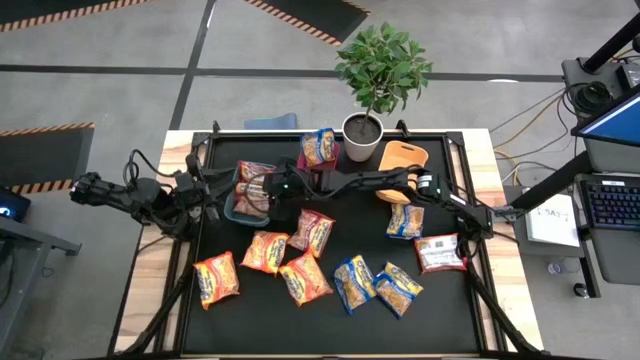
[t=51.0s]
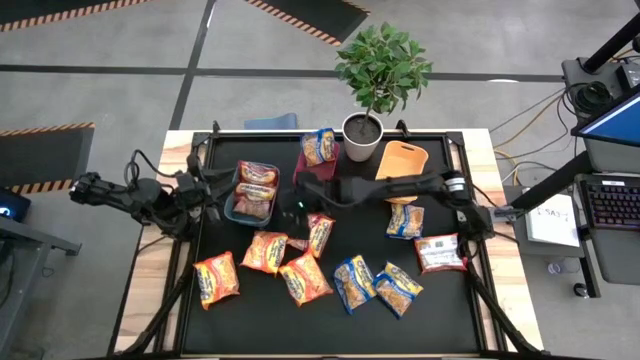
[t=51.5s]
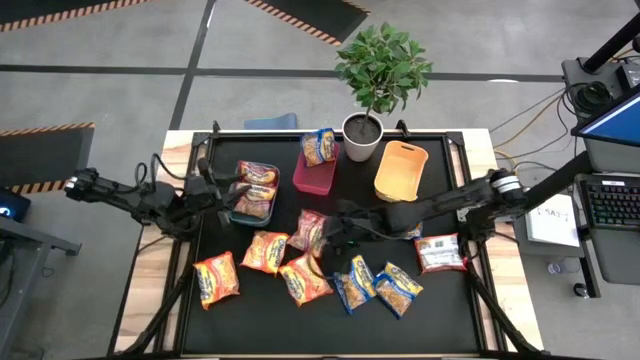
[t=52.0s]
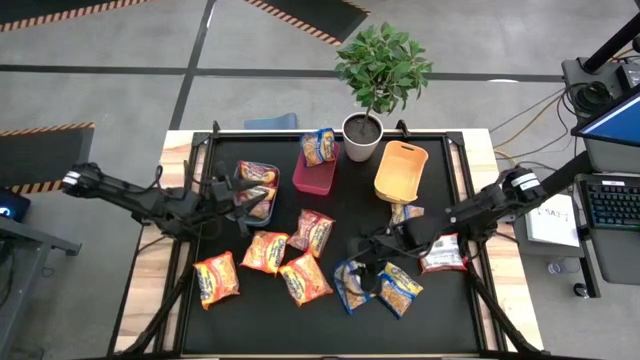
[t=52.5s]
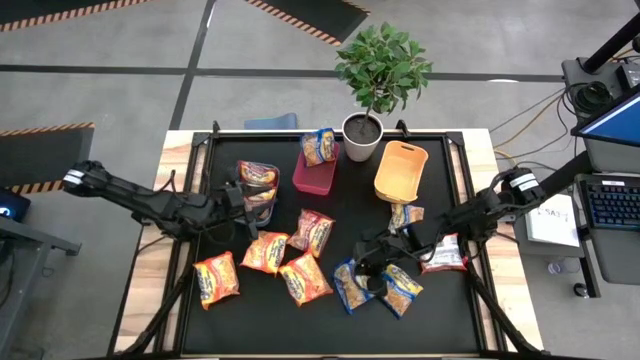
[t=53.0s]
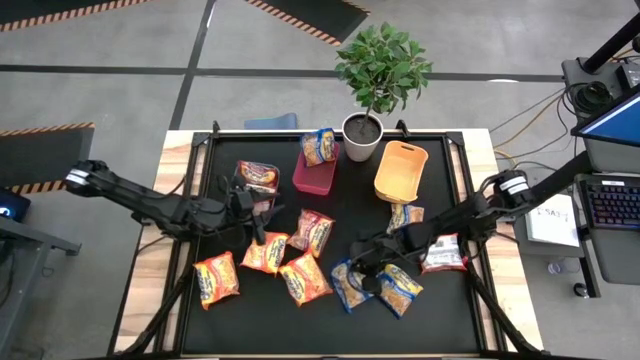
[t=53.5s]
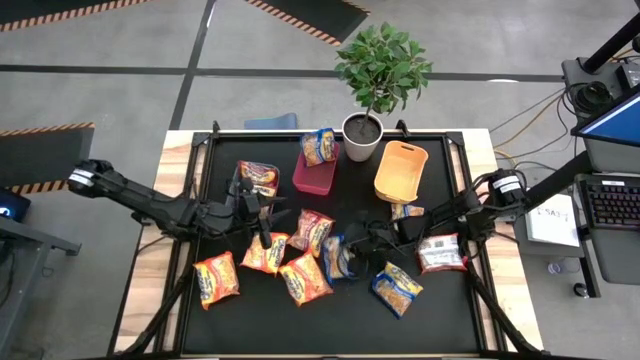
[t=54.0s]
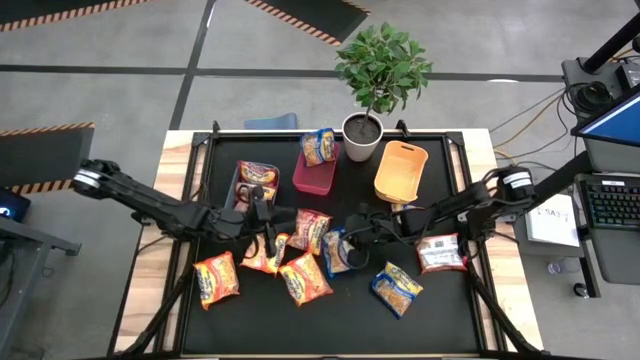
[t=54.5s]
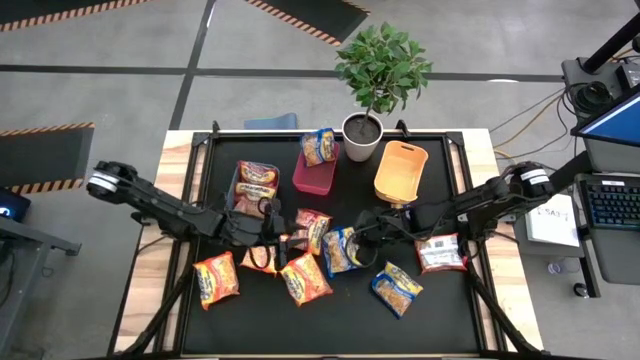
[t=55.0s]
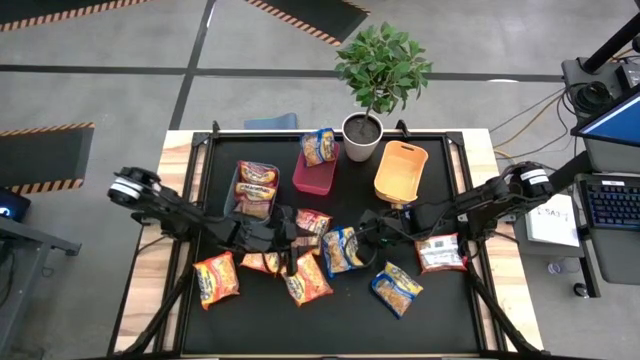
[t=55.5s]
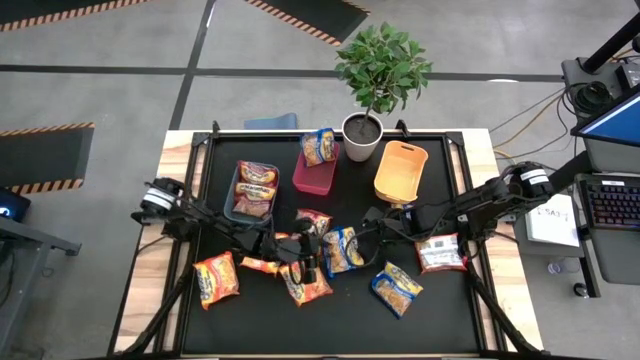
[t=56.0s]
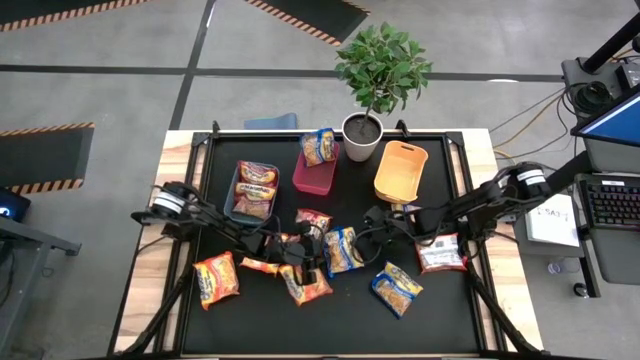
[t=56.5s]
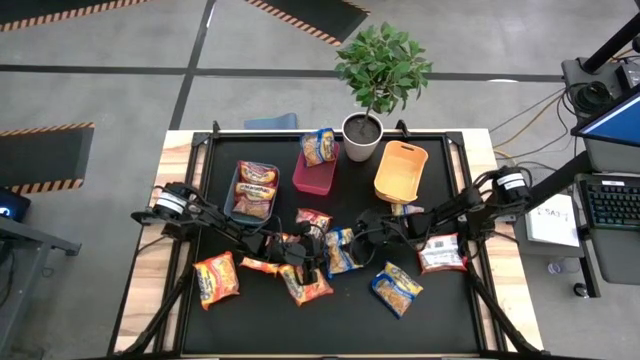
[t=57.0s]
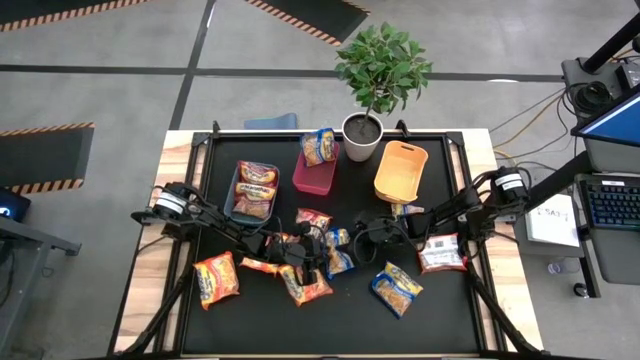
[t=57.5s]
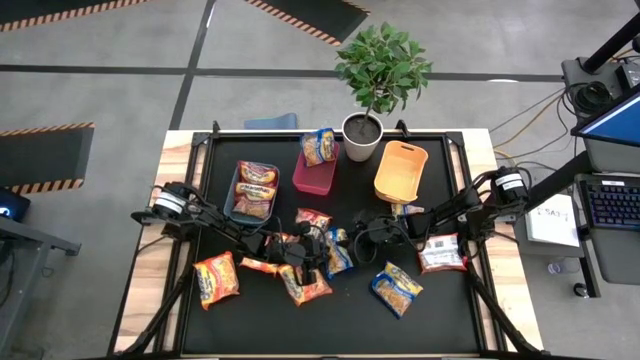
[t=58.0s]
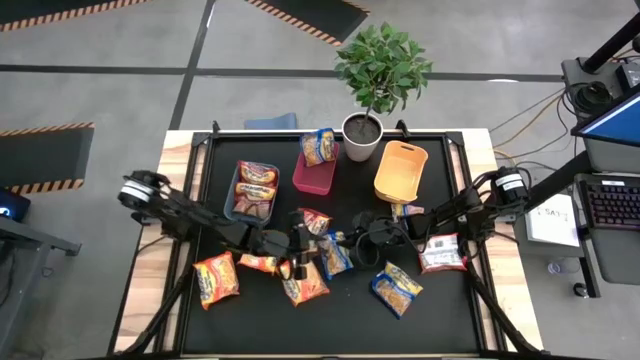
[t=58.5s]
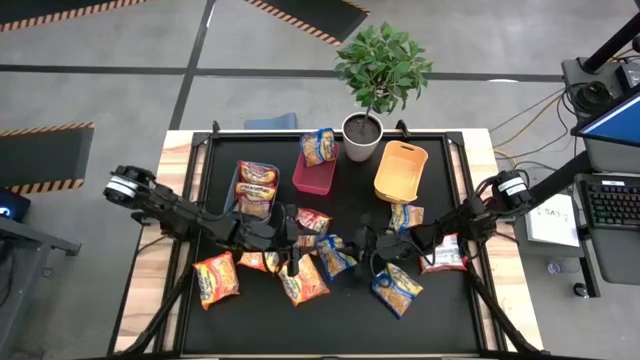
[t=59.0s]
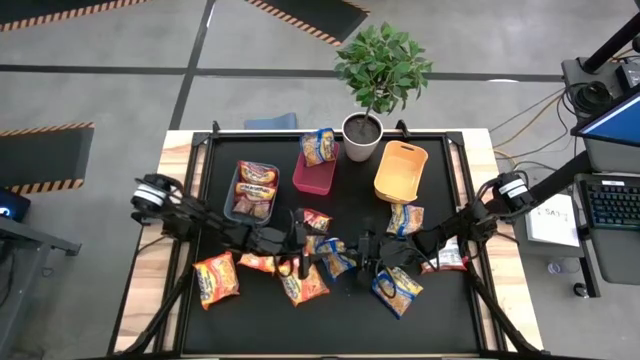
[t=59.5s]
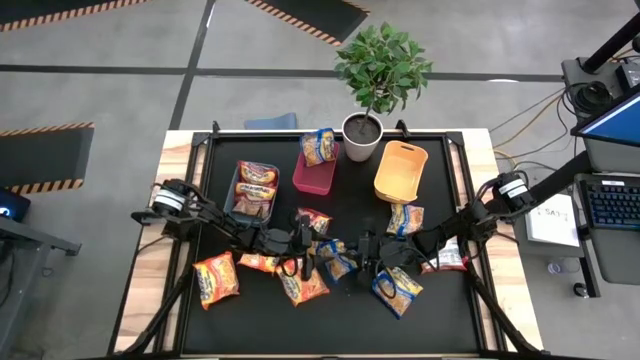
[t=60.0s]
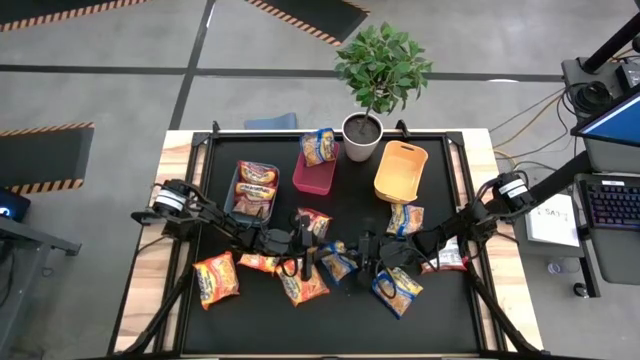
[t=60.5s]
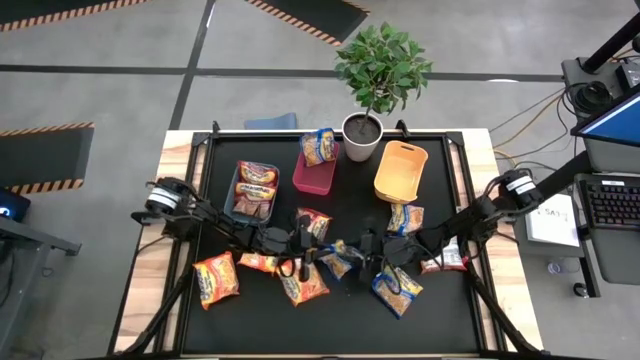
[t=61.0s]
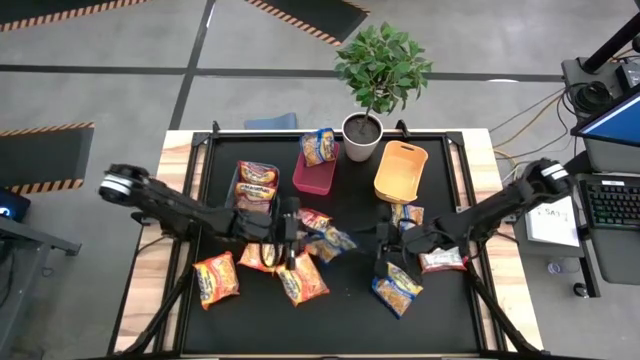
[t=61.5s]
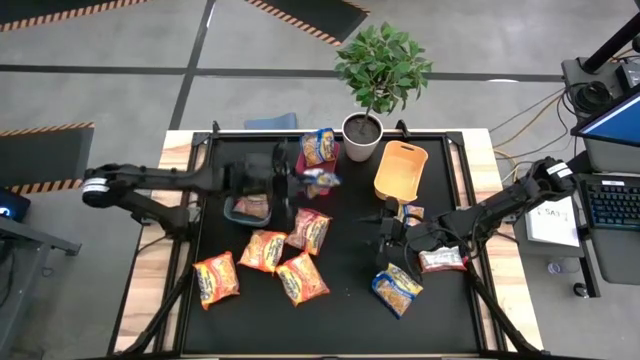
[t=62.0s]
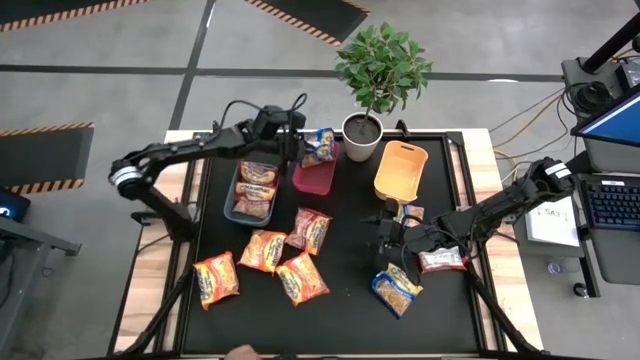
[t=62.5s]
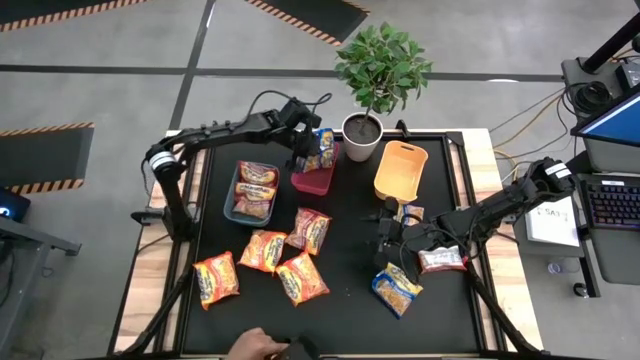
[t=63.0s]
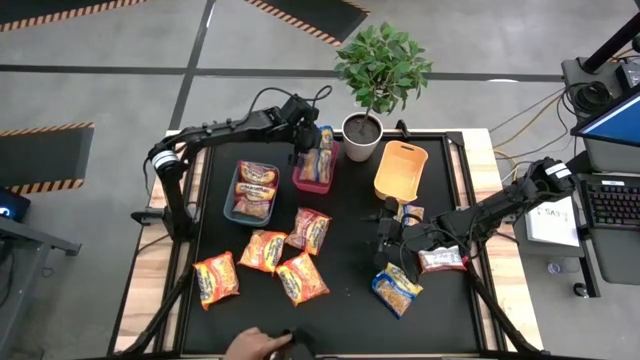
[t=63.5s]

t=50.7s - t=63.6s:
Task: Sort Maruchan noodles
Put the left blue noodle pack into the red bin

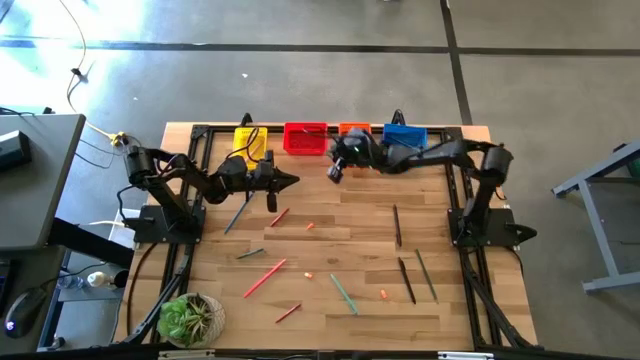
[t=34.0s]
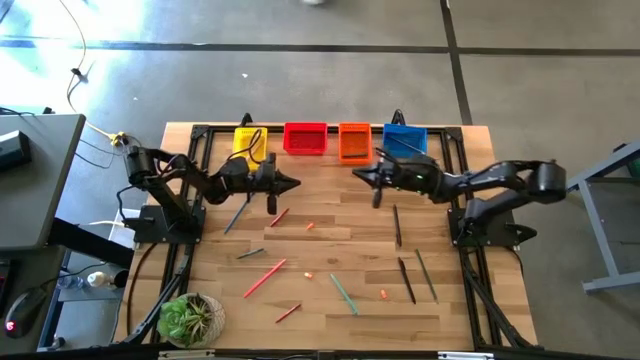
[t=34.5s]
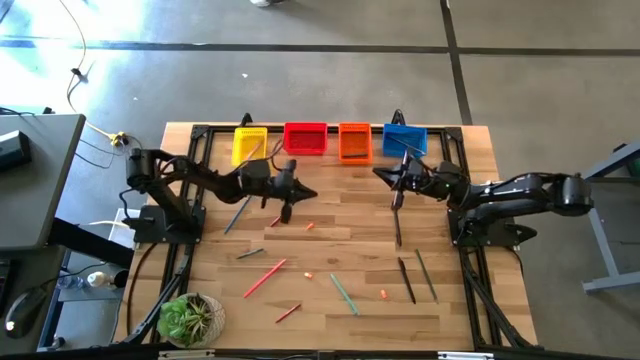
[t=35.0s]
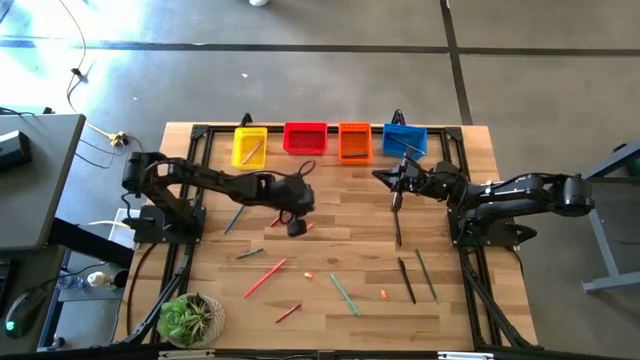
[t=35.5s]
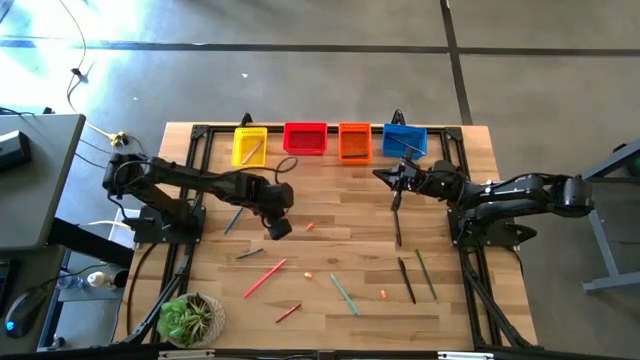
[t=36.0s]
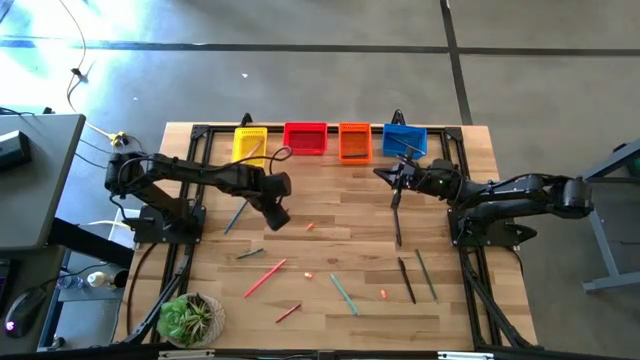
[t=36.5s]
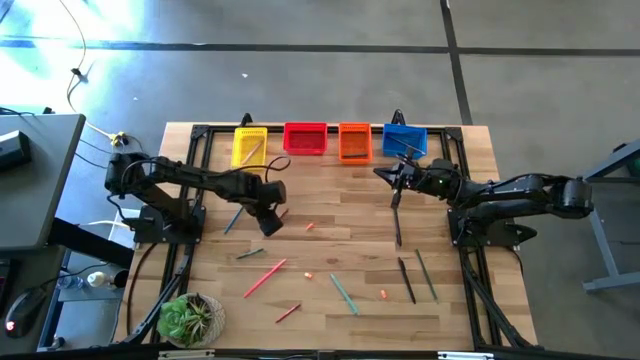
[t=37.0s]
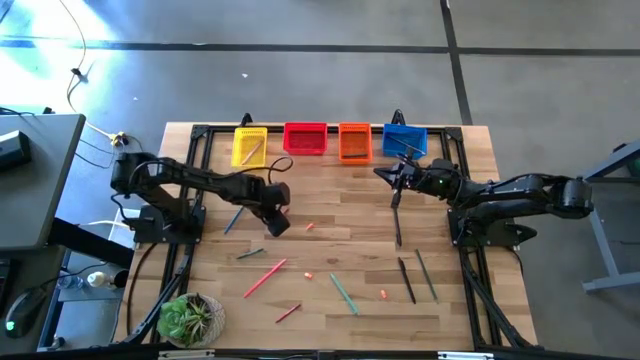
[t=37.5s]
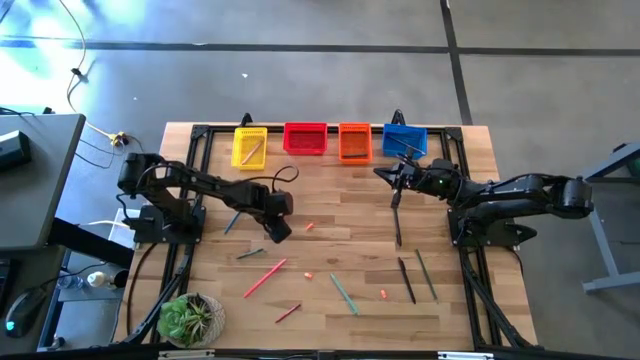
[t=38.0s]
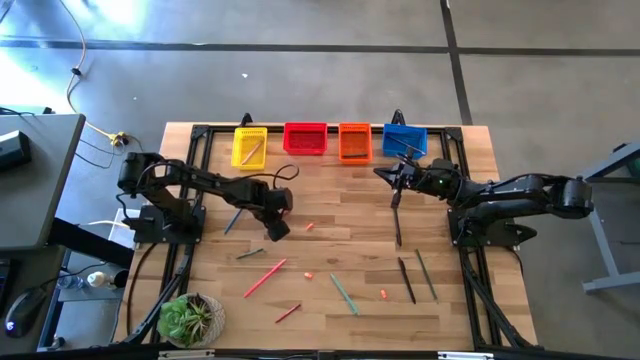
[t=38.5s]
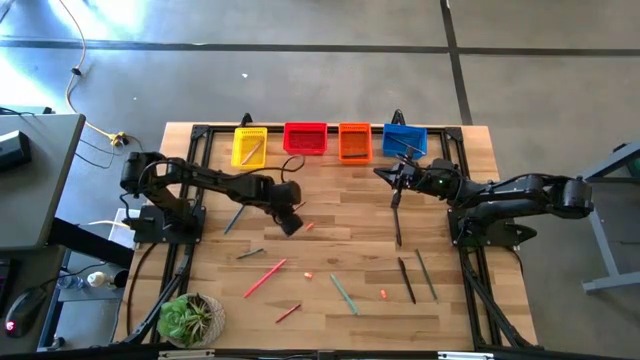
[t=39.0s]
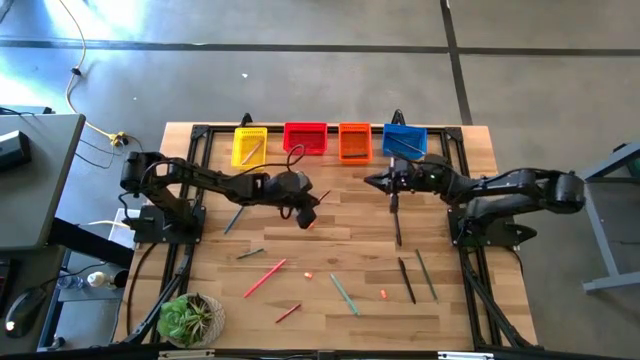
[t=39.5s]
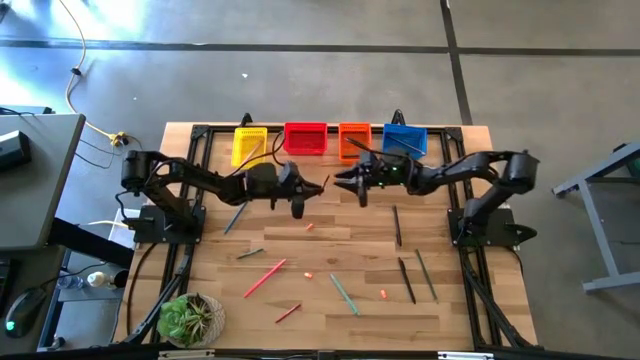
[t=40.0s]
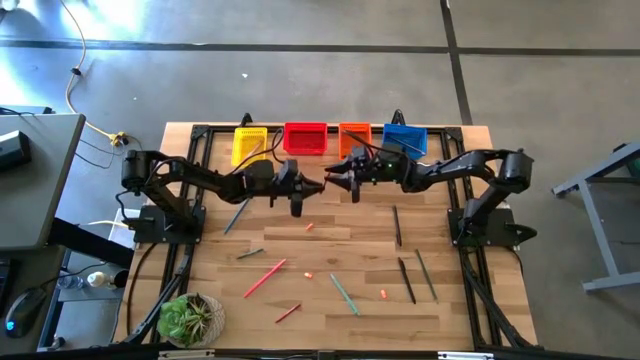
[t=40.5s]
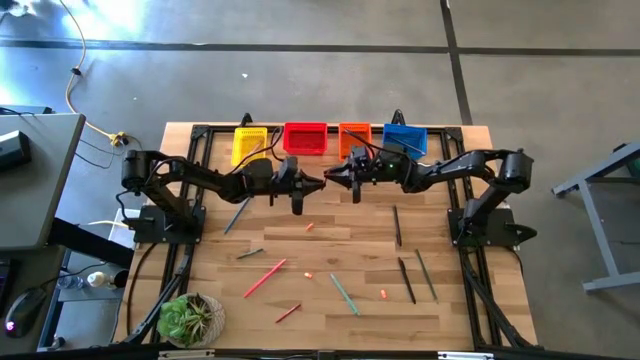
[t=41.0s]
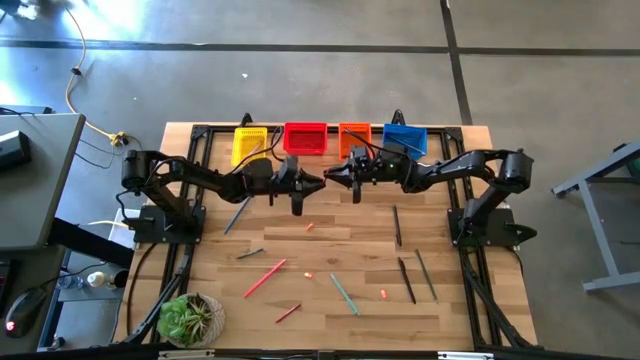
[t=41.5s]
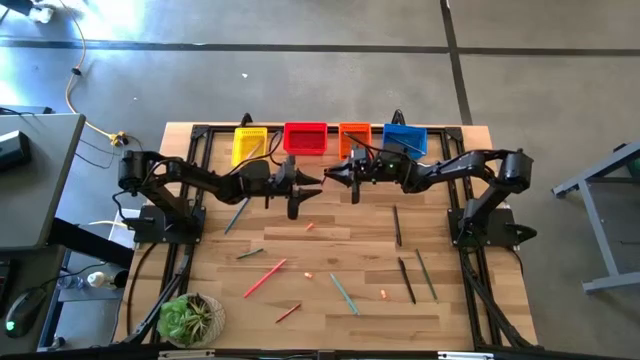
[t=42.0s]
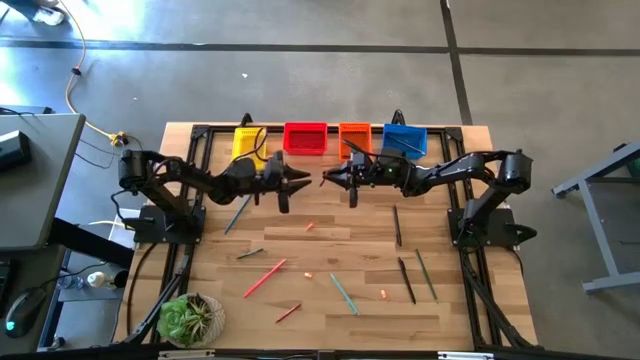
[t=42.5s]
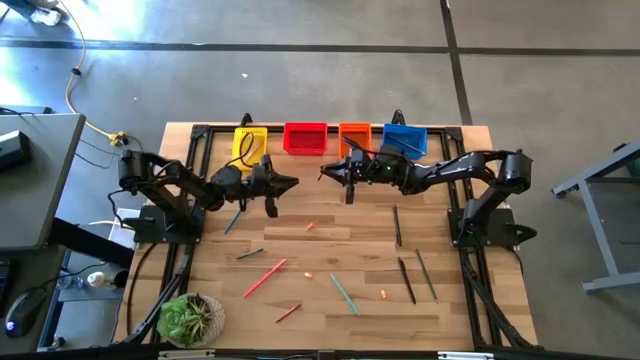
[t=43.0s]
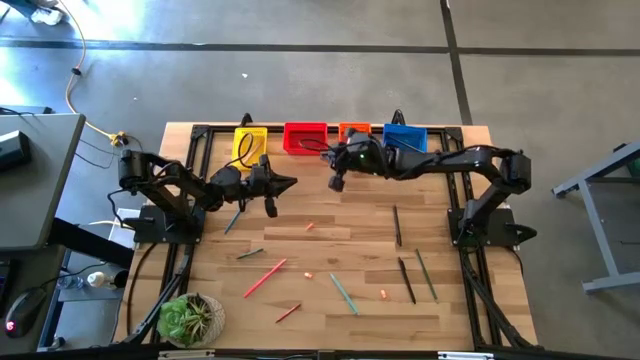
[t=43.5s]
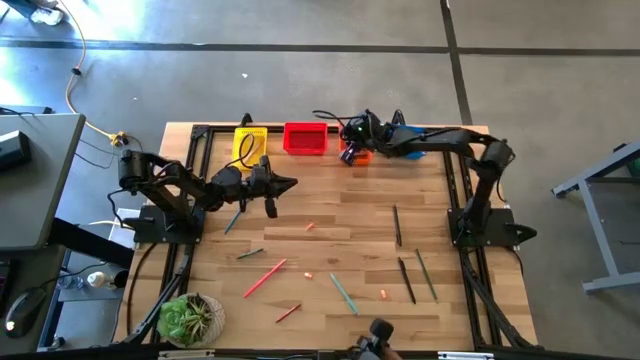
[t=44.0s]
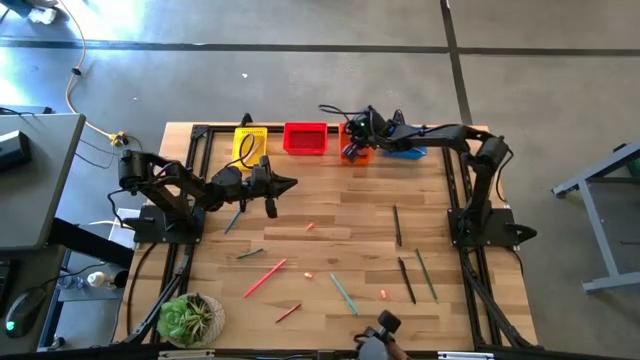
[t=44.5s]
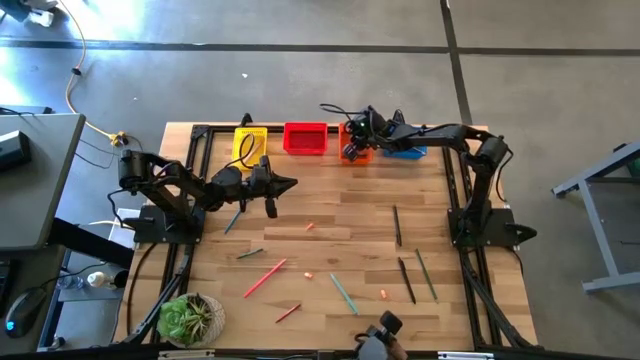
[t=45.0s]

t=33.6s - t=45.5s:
Task: Sort crayons/erasers/pens/pencils in bins
Put the top red crayon into the orange basket
